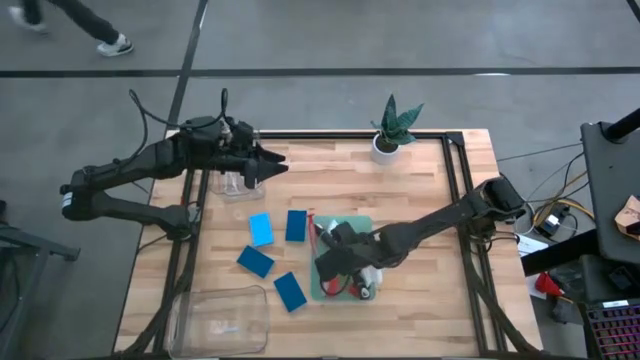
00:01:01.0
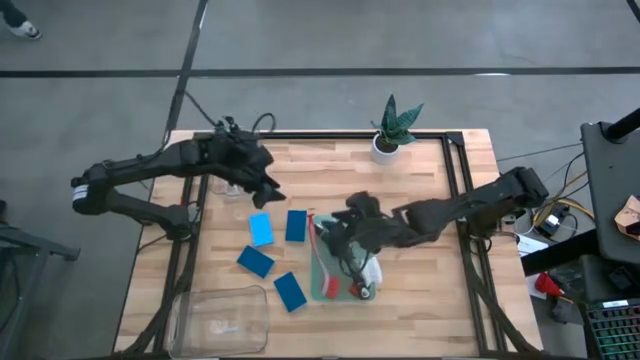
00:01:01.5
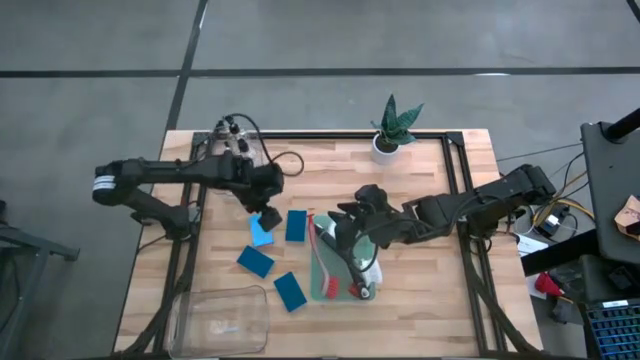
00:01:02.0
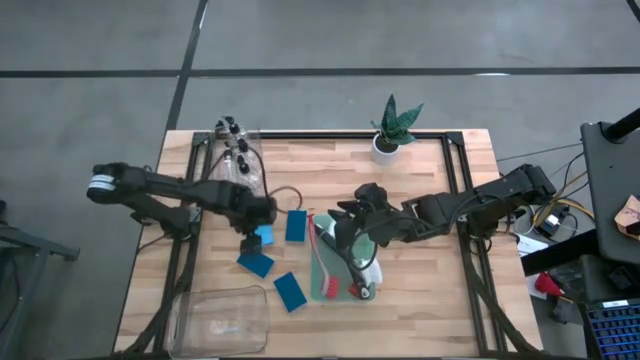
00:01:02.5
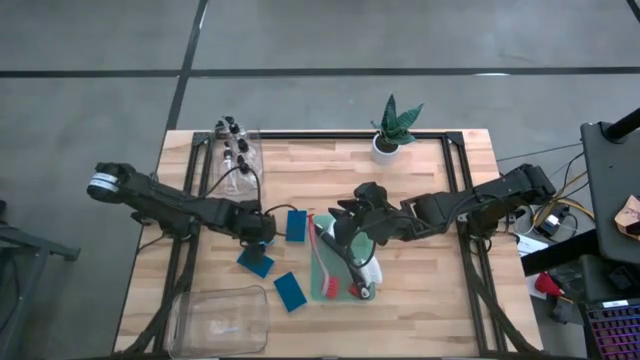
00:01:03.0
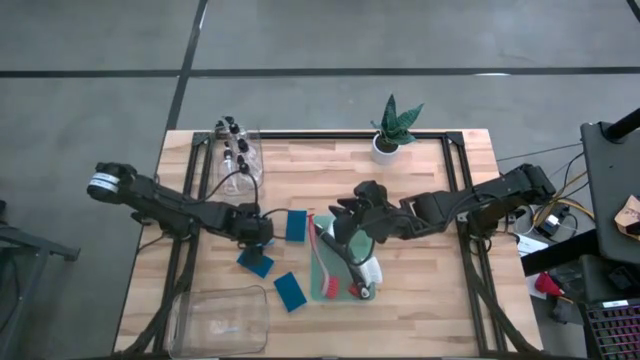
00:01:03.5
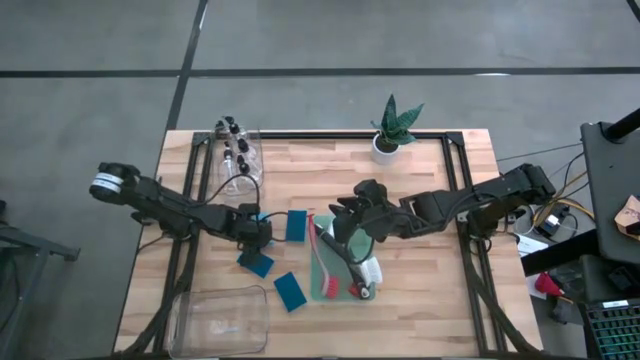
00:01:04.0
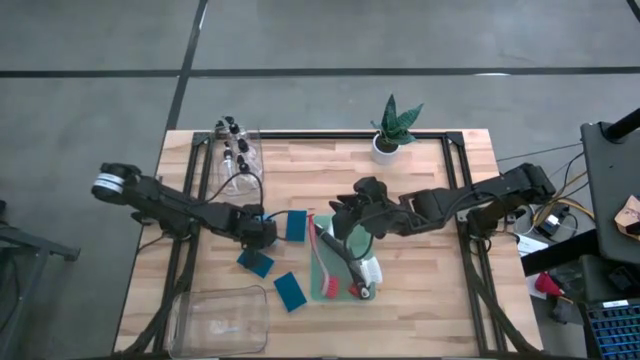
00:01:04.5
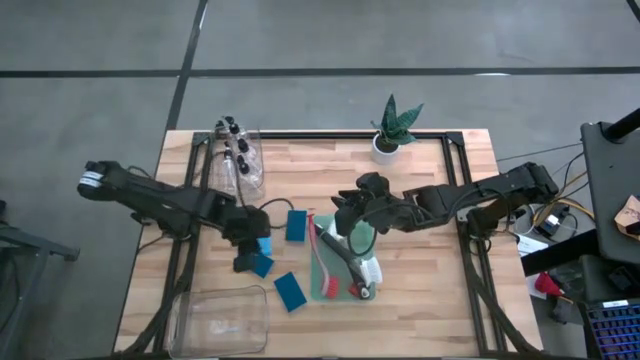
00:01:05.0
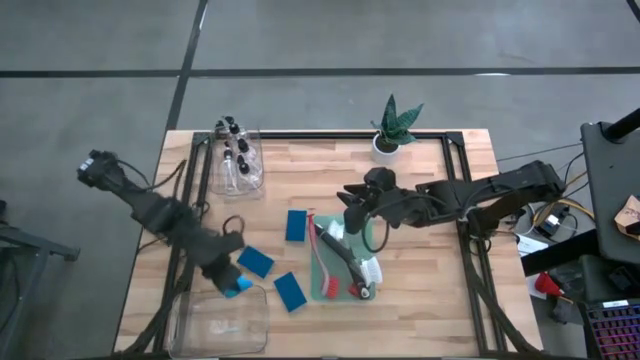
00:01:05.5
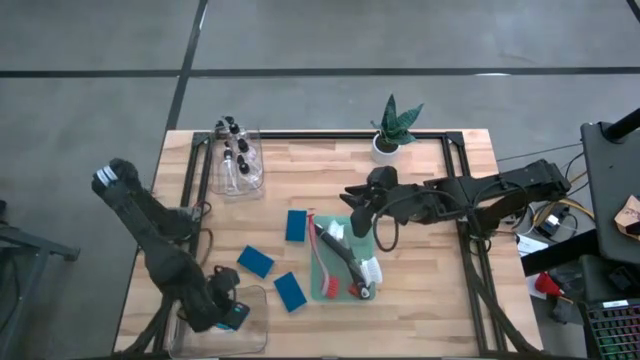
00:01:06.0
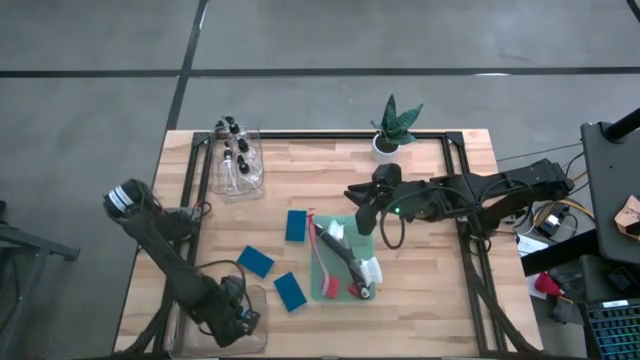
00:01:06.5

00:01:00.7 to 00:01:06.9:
Task: Pick & Place Kitchen Sink Supplies
Put the blue sponge into the bottom transparent bin

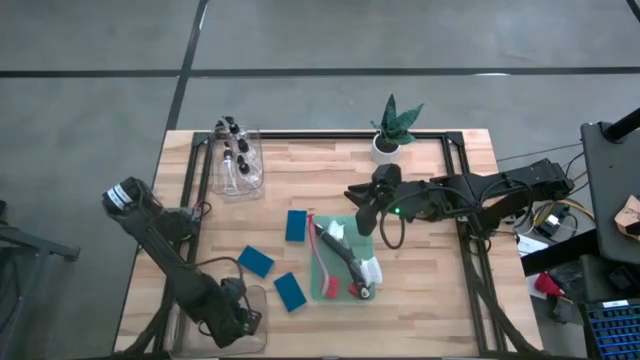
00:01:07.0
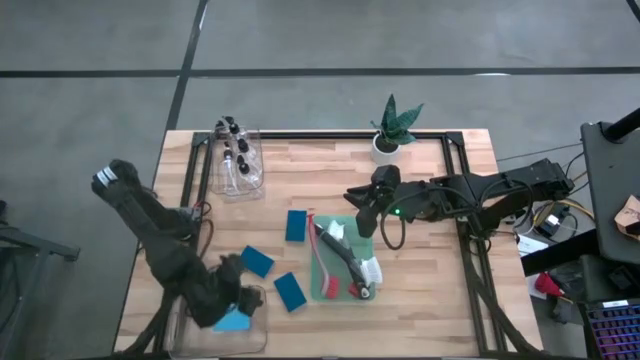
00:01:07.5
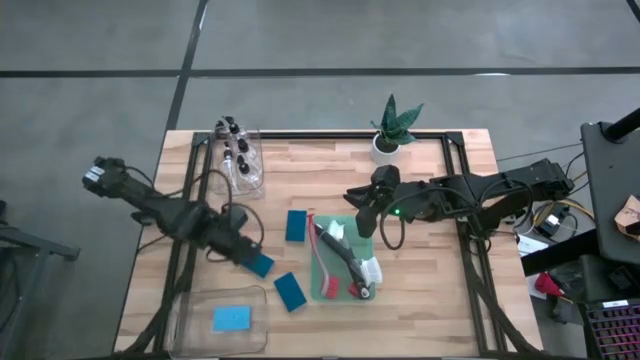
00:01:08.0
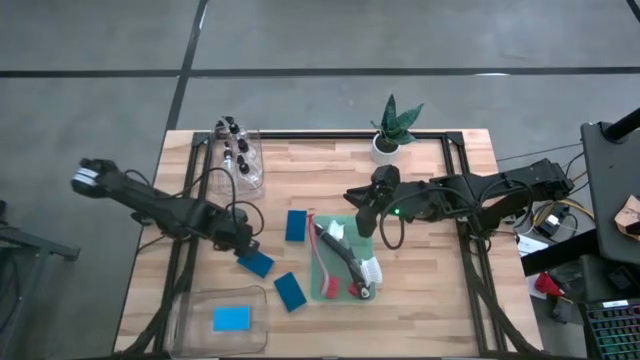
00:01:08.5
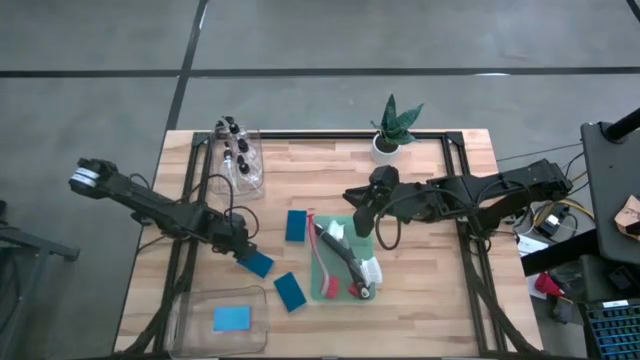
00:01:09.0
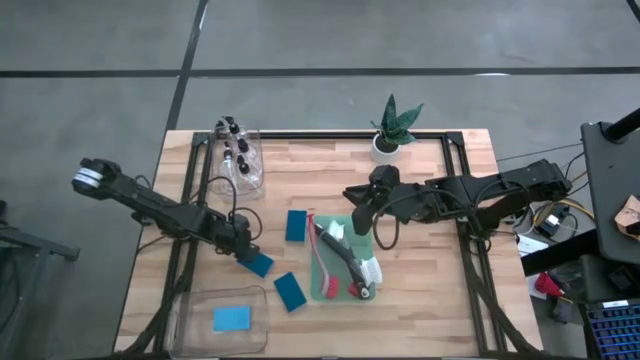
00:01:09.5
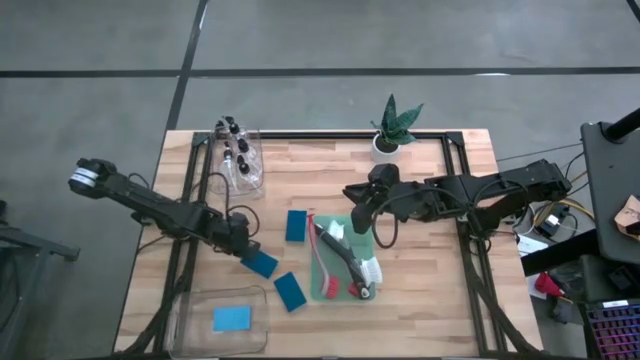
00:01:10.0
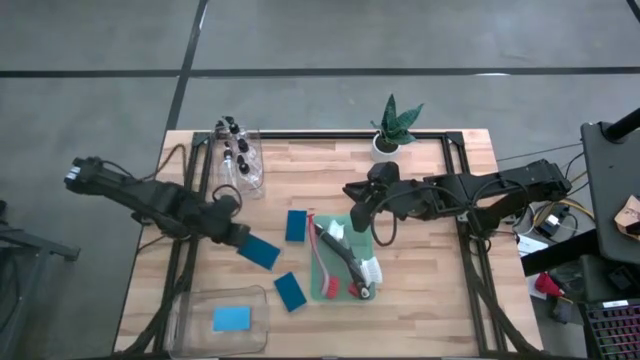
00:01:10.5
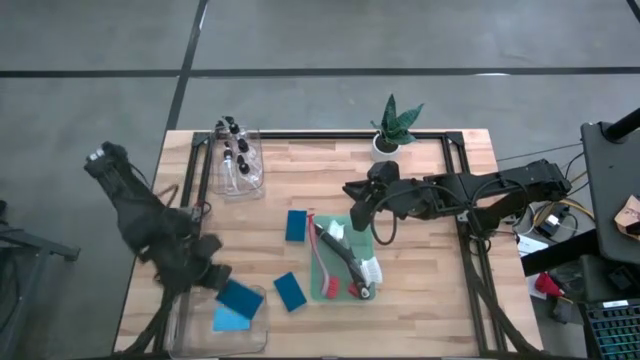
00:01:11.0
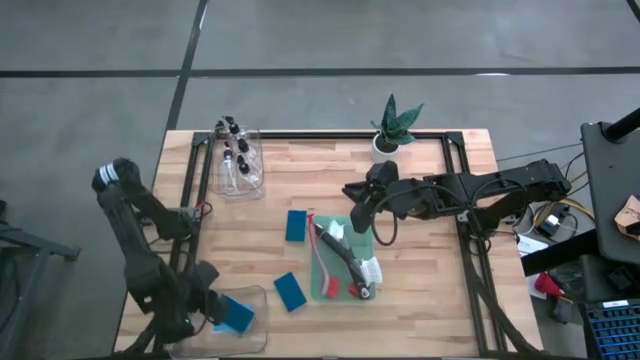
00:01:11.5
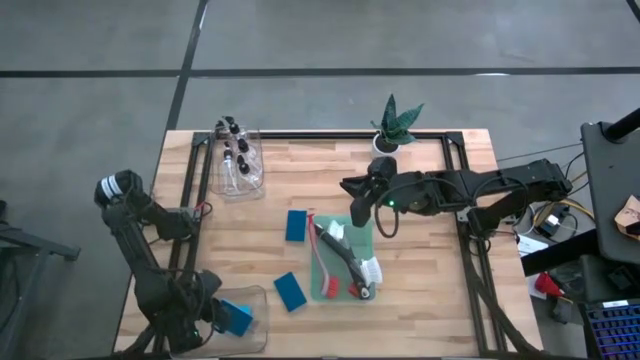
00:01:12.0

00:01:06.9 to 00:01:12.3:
Put the blue sponge into the bottom transparent bin

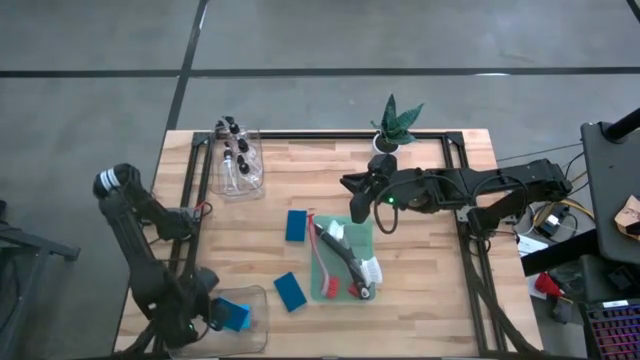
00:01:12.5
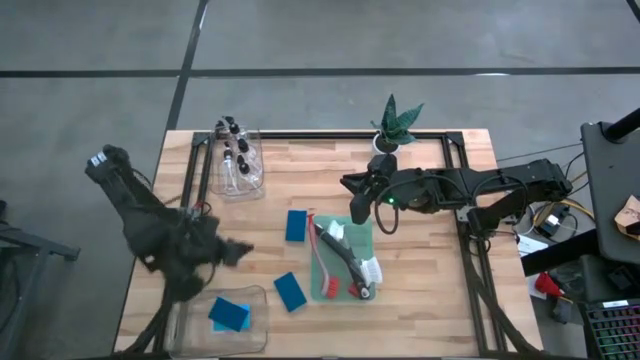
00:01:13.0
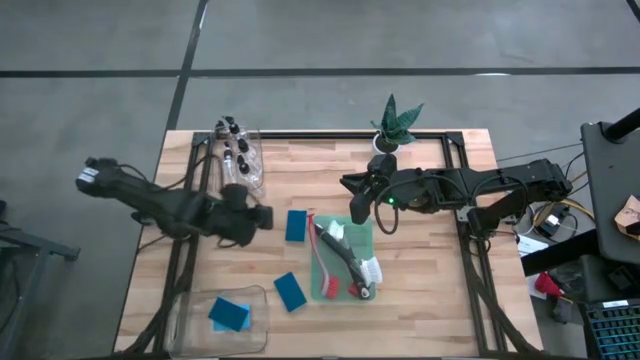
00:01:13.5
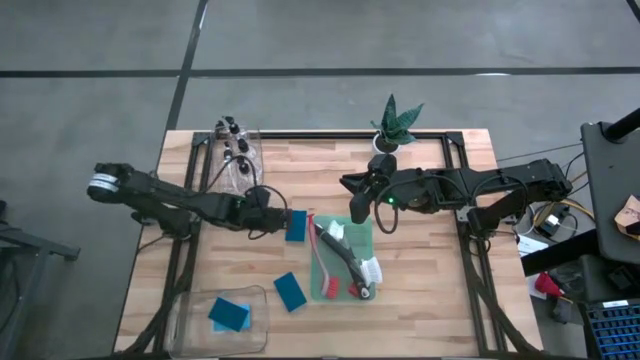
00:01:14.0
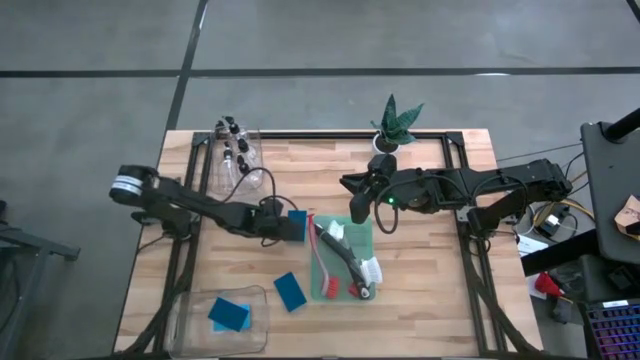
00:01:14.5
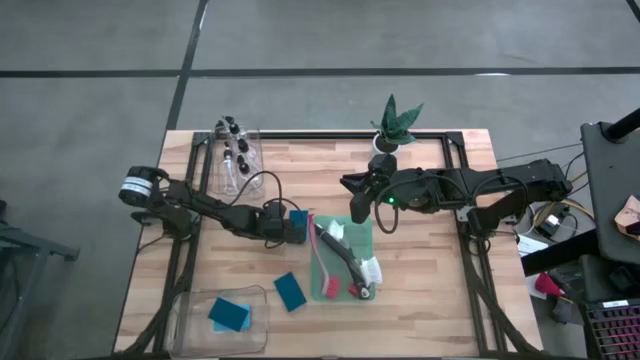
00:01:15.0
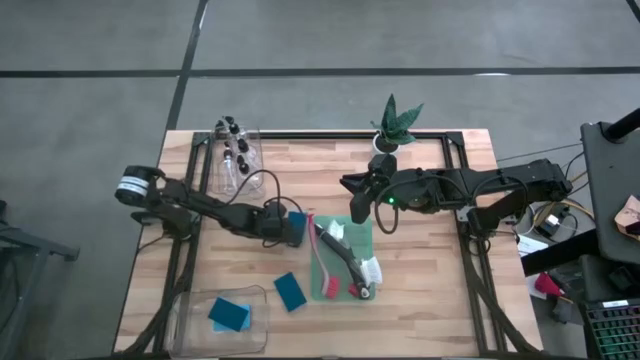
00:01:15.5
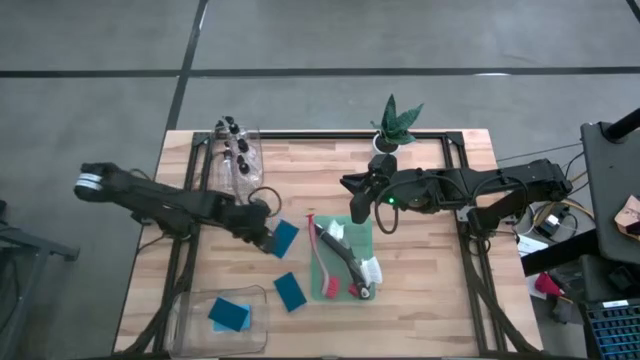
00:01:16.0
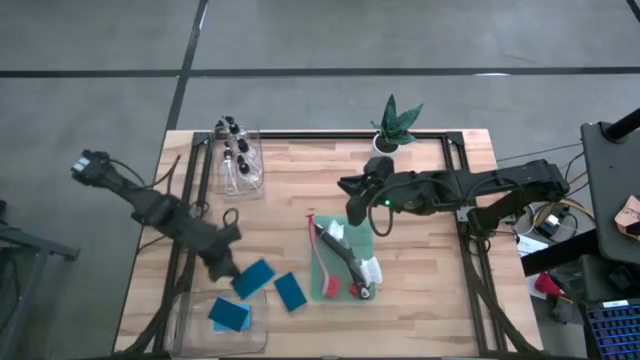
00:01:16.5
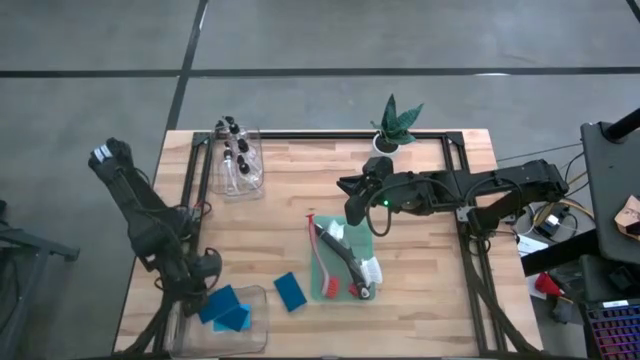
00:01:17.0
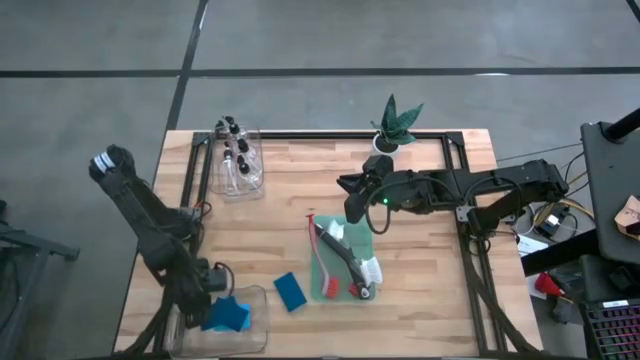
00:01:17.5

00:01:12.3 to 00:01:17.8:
Put the blue sponge into the bottom transparent bin

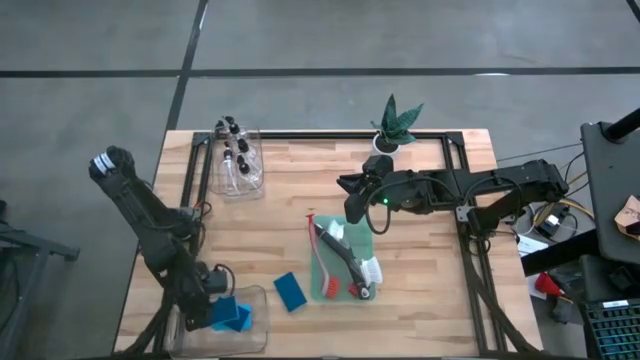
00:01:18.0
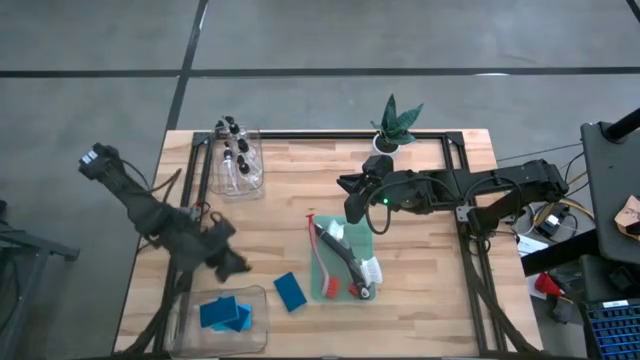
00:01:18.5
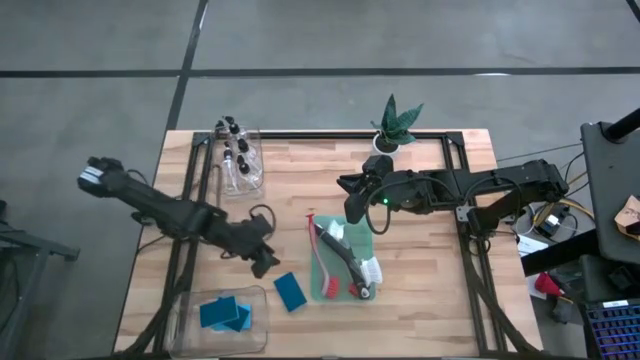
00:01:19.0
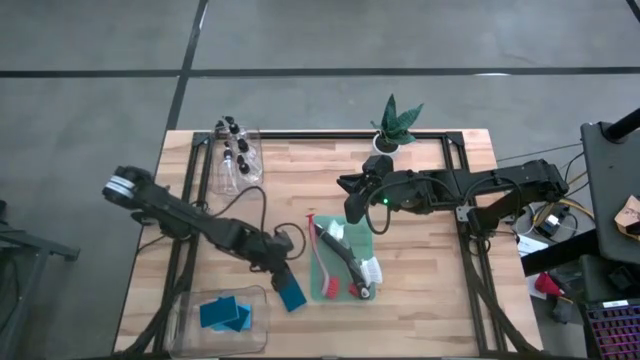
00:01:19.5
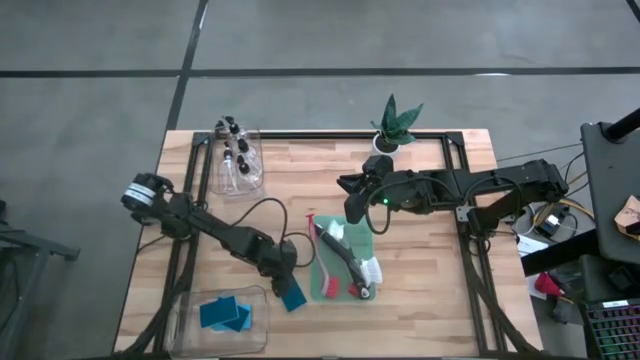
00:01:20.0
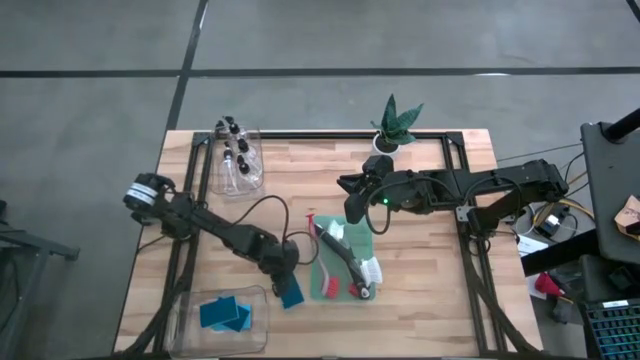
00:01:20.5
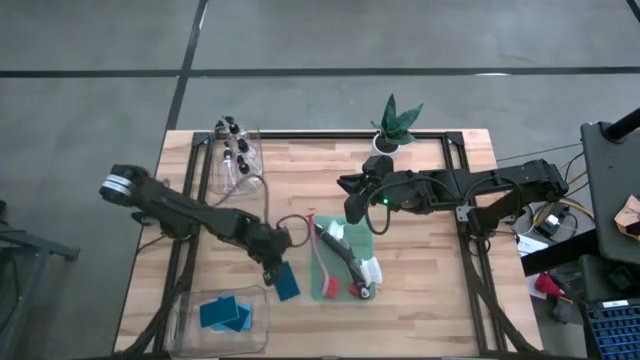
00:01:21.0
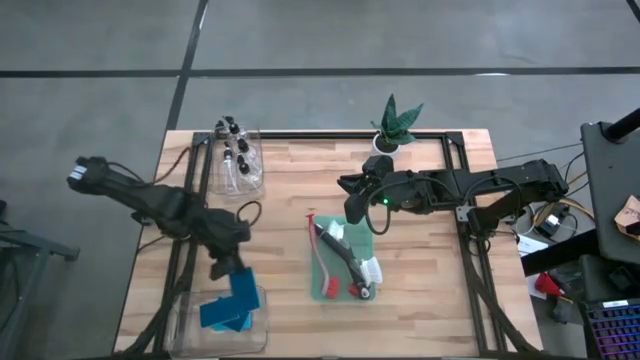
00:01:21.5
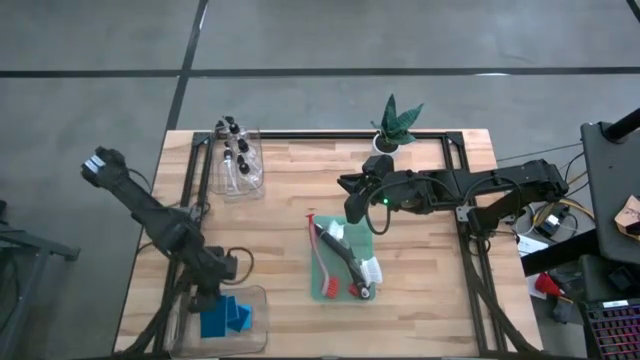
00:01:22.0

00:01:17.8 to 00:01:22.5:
Put the blue sponge into the bottom transparent bin
